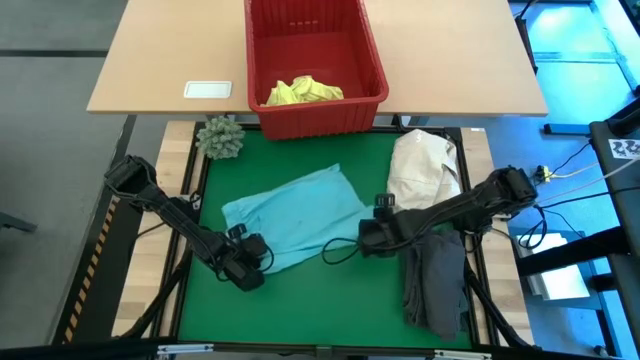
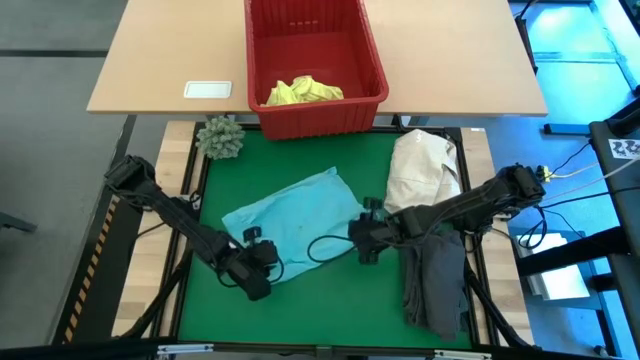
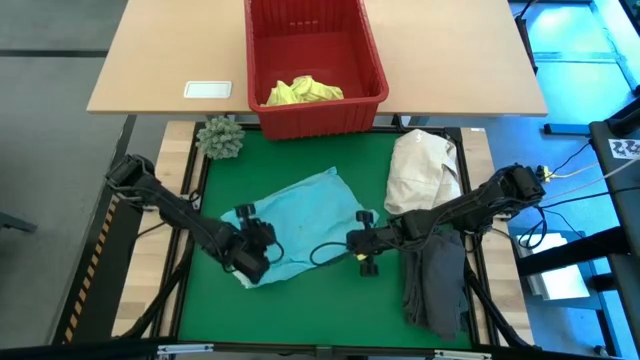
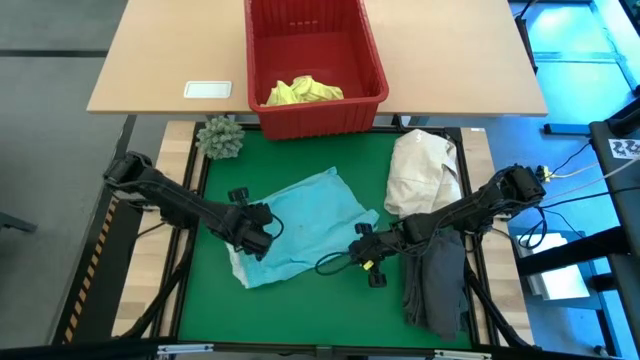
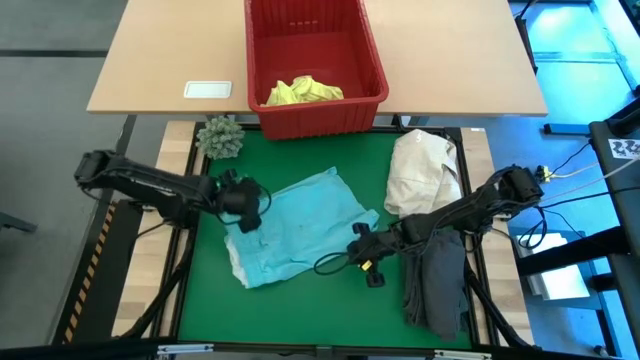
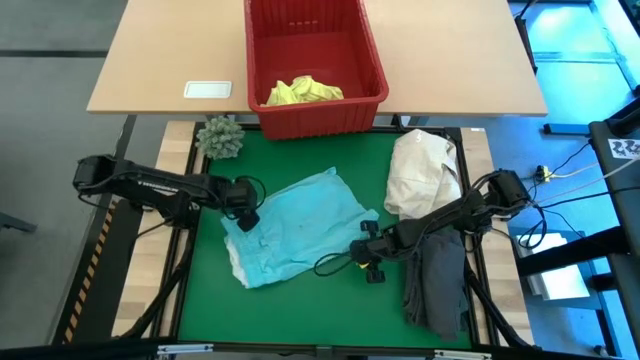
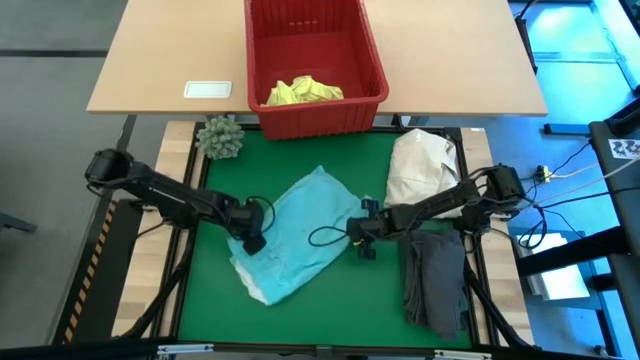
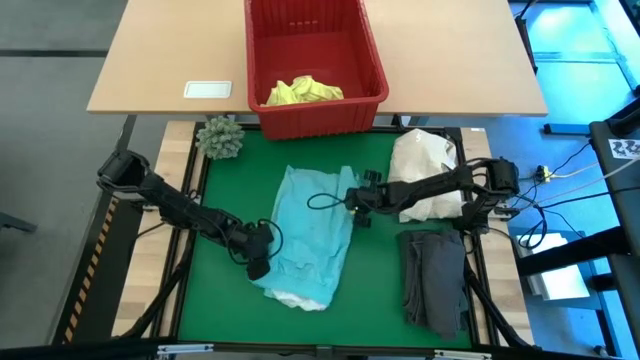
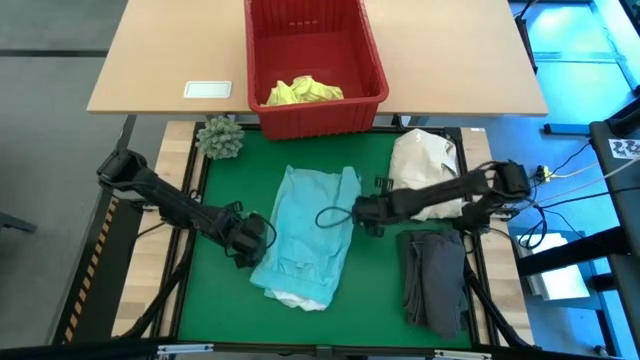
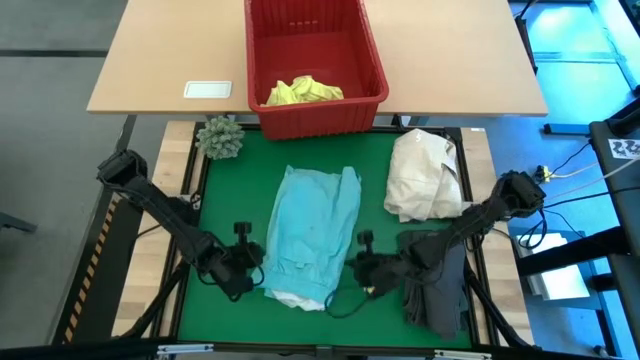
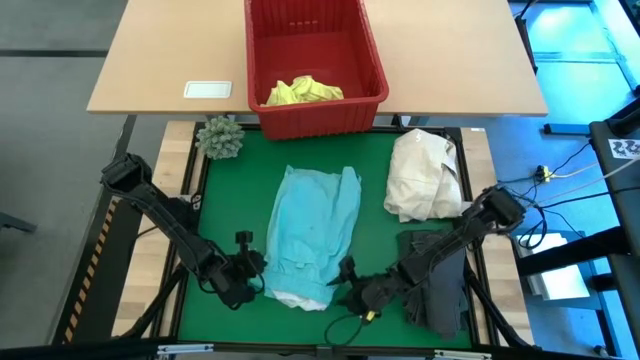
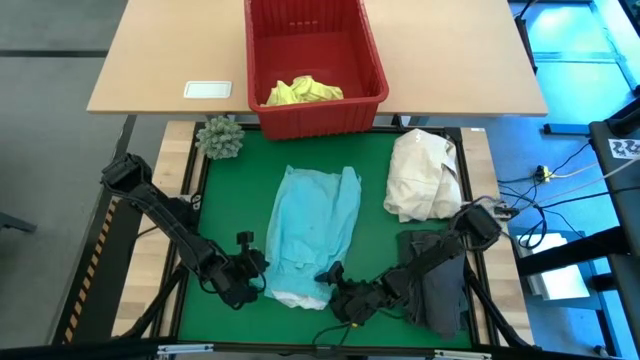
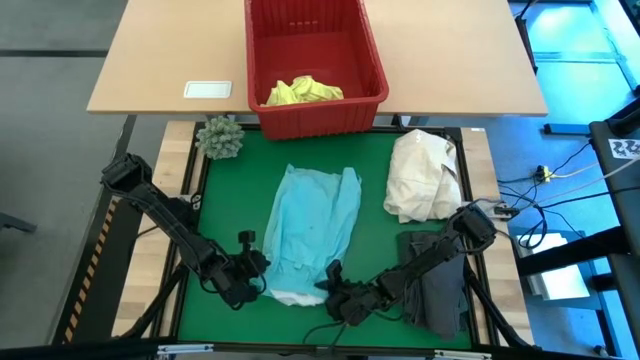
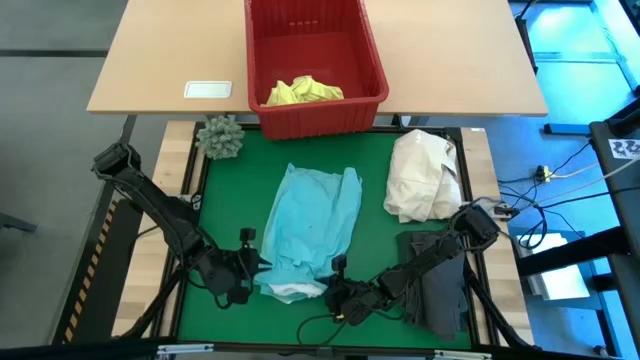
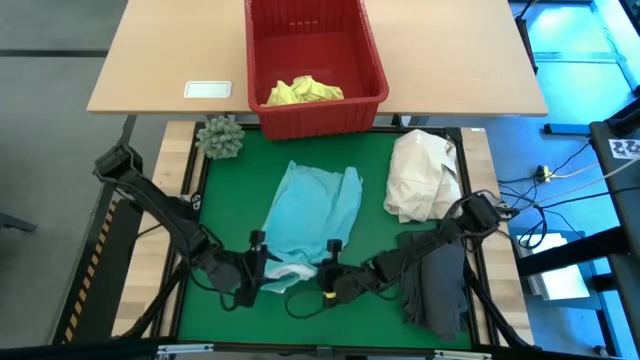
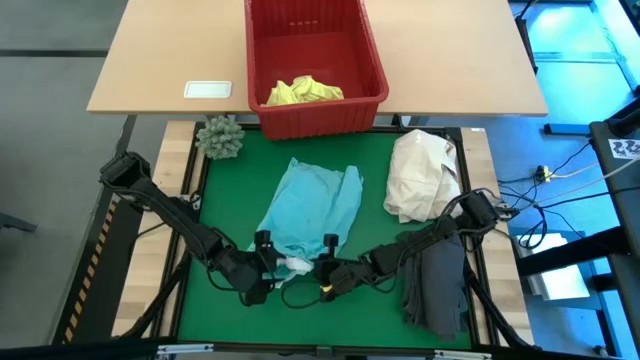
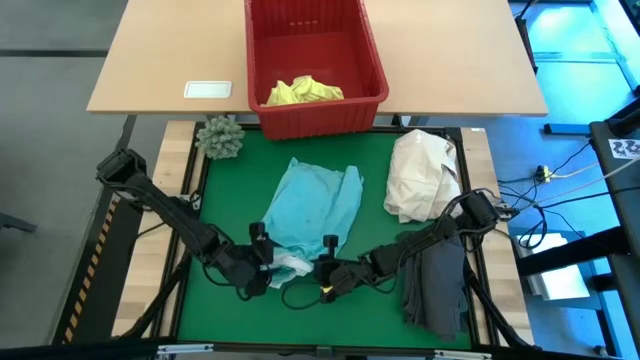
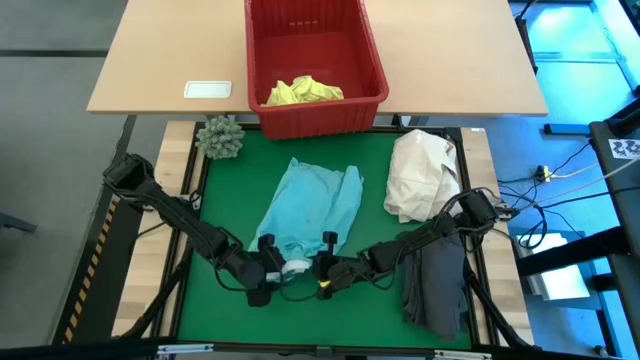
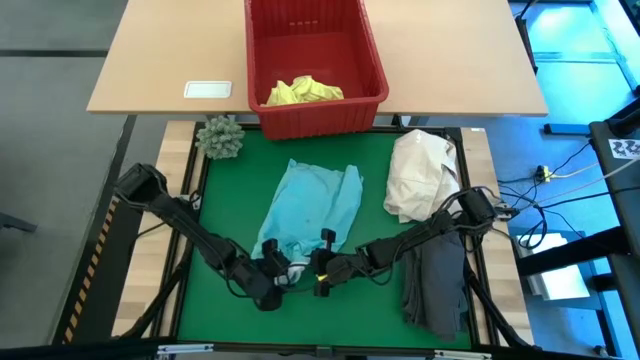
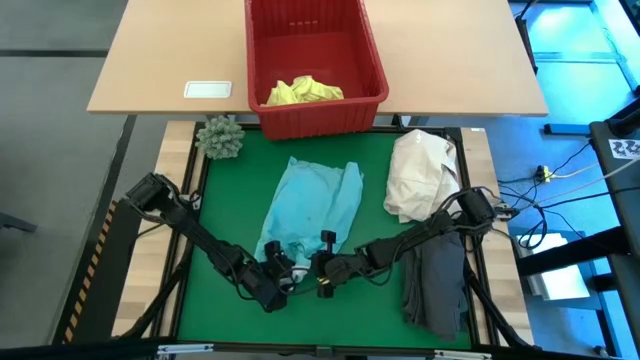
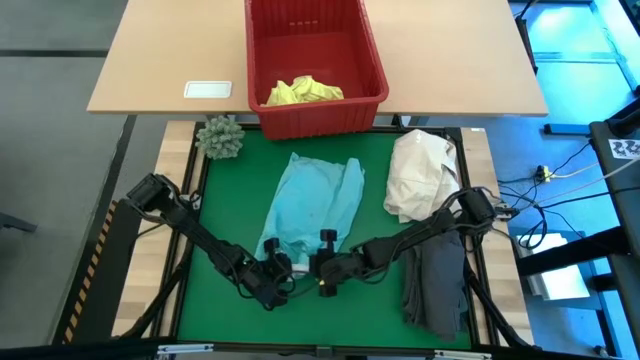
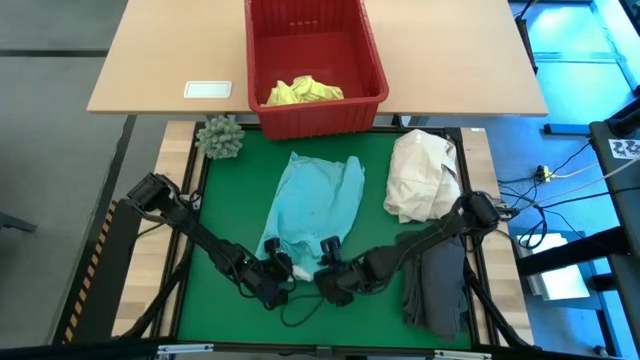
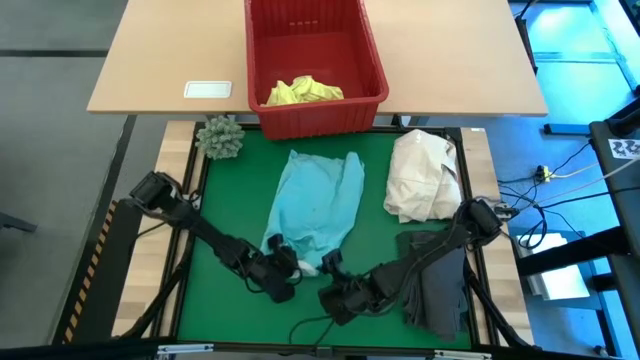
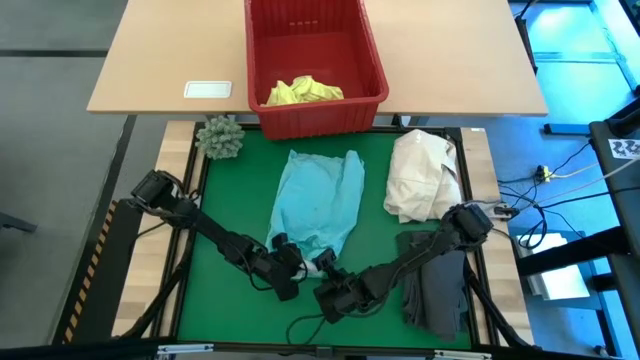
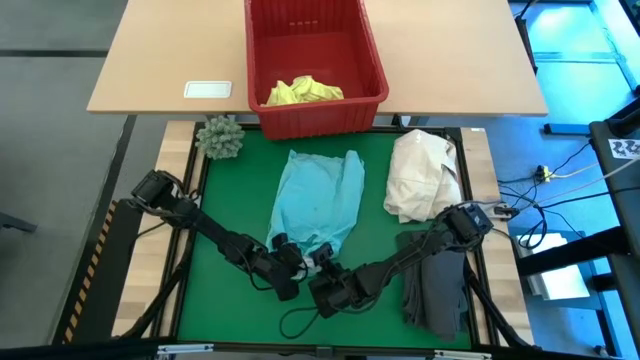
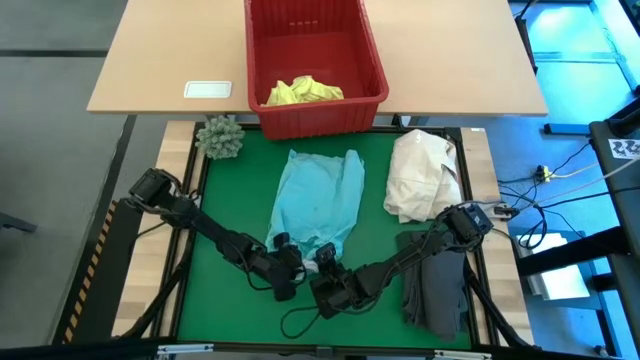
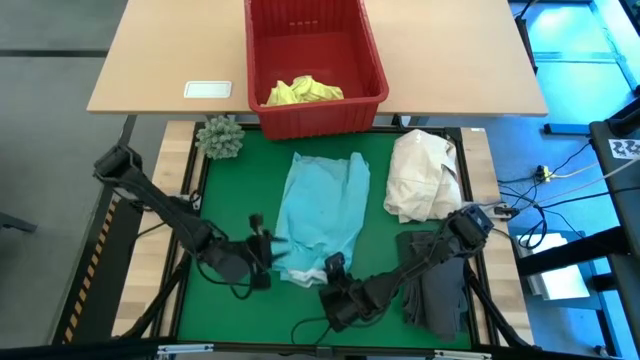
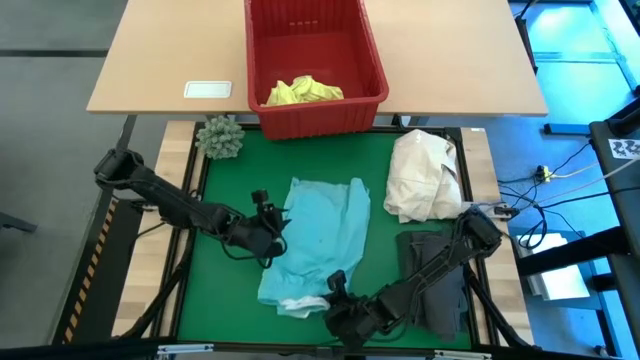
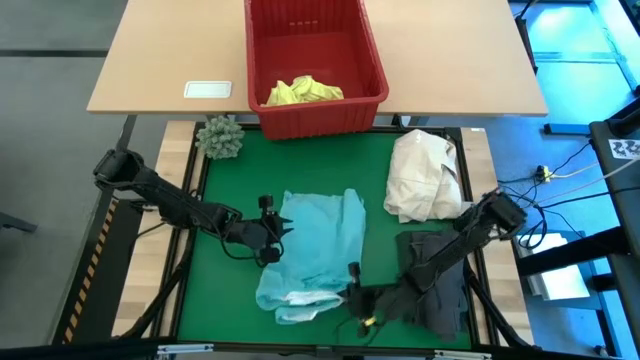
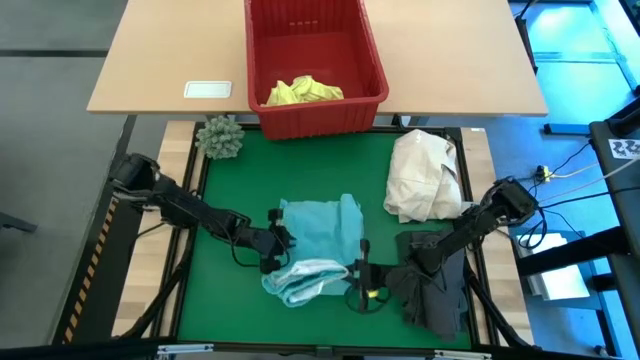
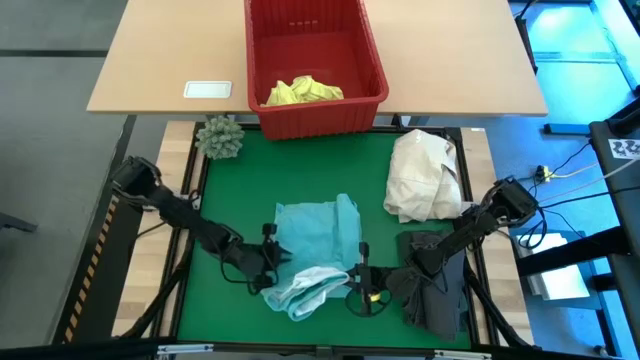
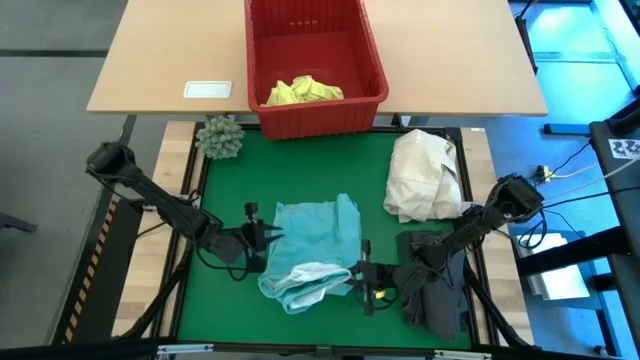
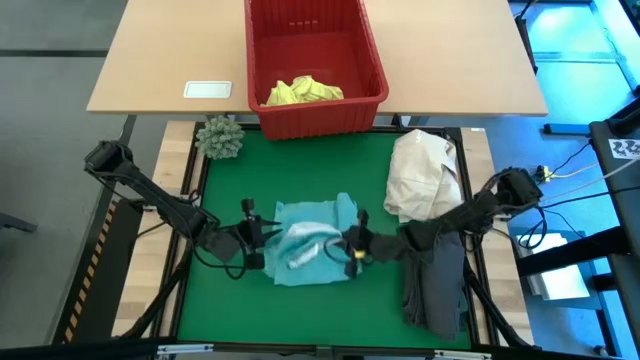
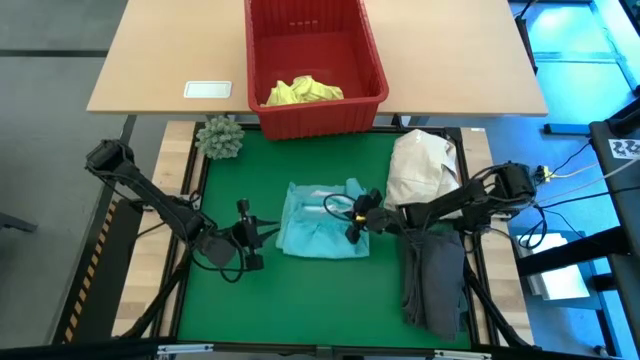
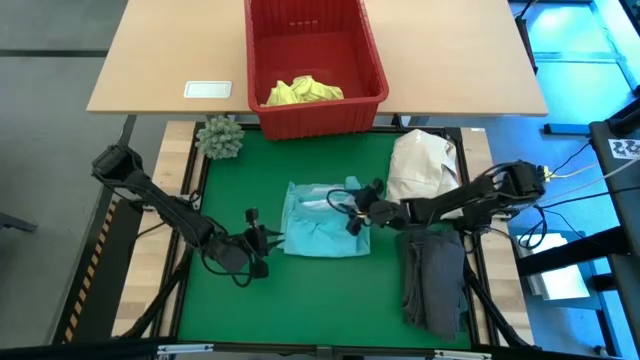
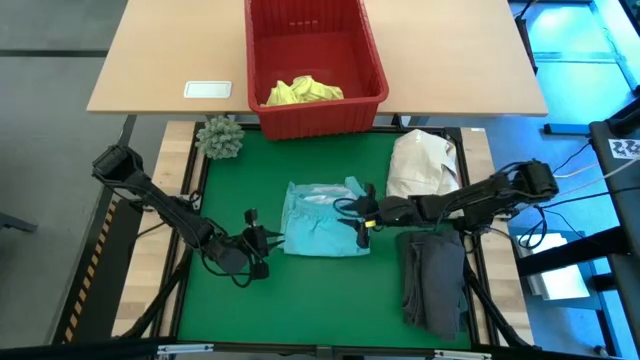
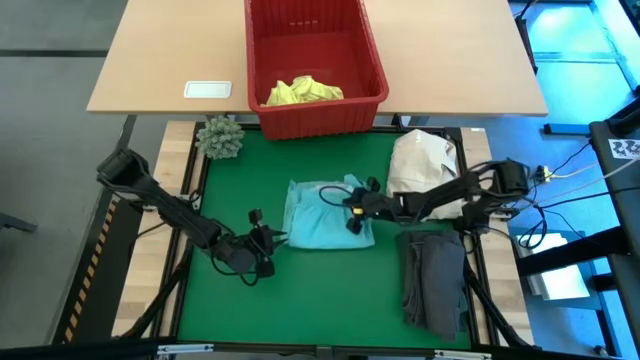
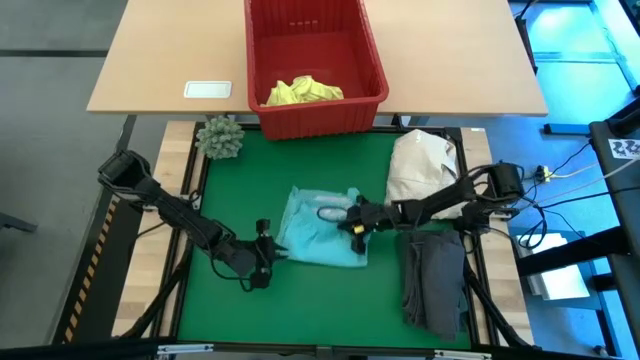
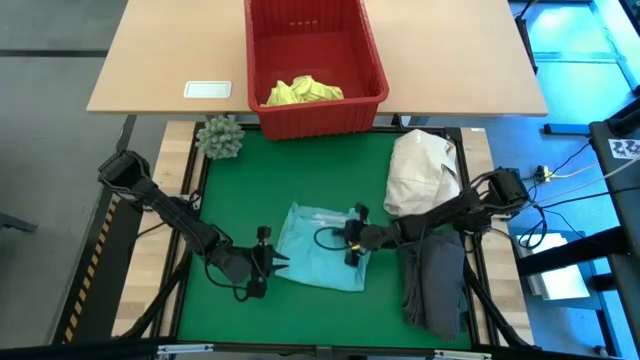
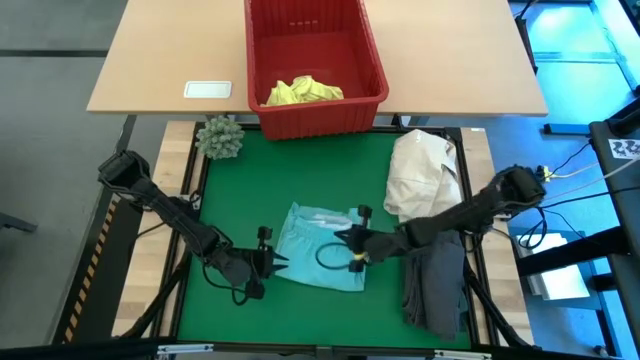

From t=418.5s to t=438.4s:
Task: Fold Laundry from Bin
Fold the blue short

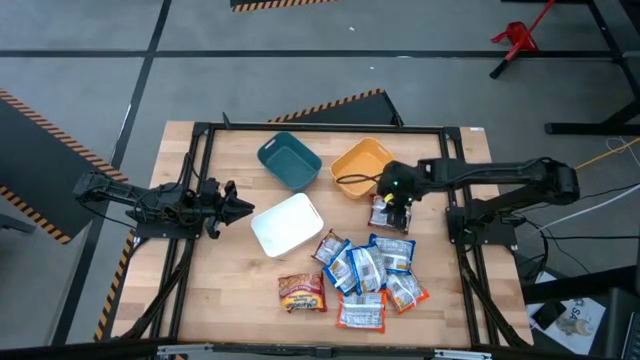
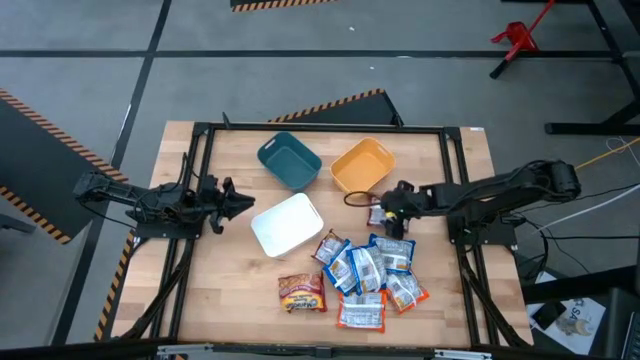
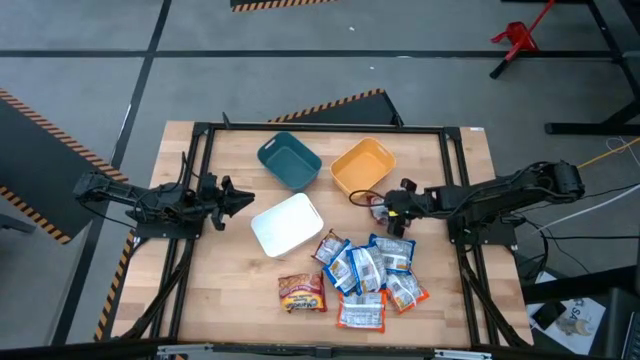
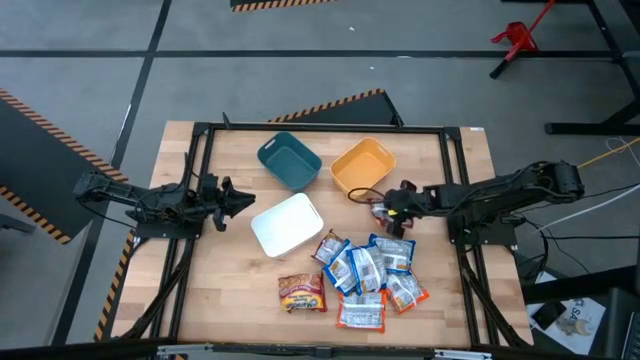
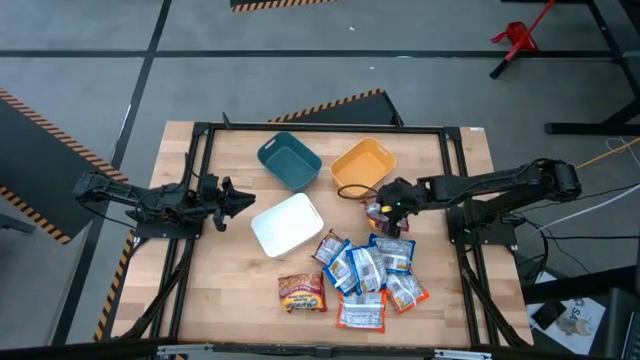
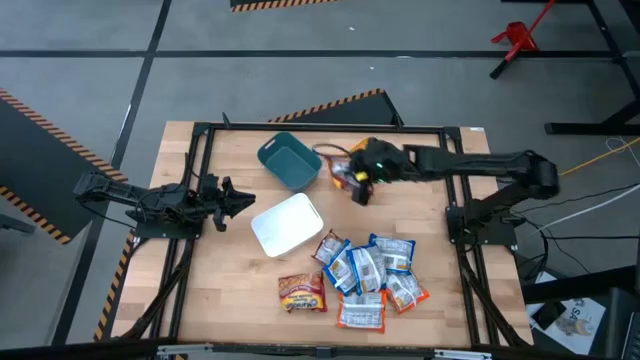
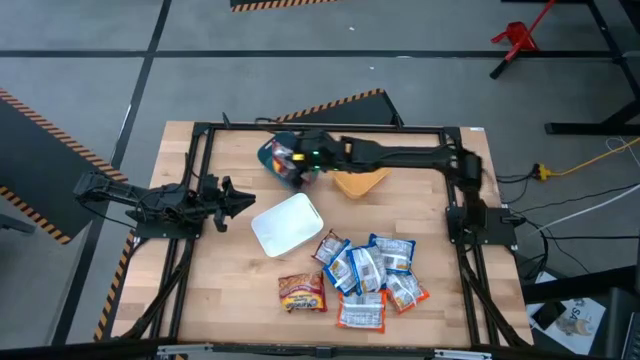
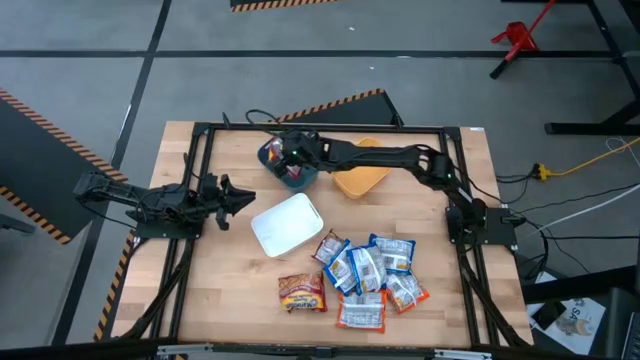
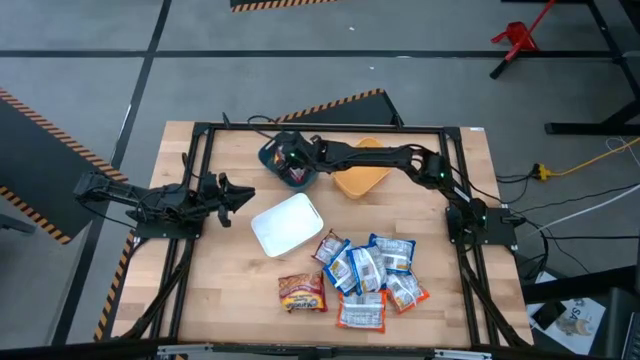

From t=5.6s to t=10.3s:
Task: Sort Maruchan noodles
Put the top red noodle pack into the blue bin
